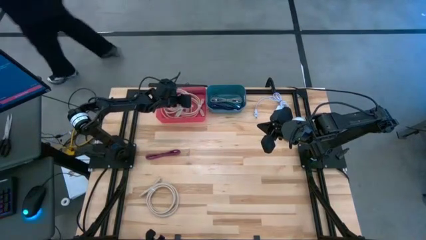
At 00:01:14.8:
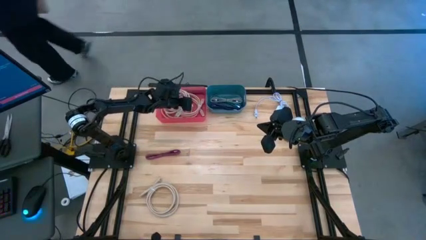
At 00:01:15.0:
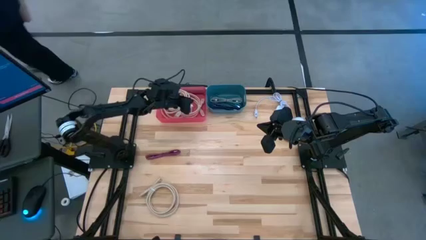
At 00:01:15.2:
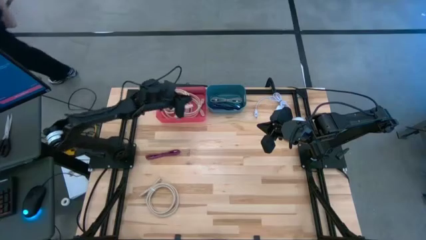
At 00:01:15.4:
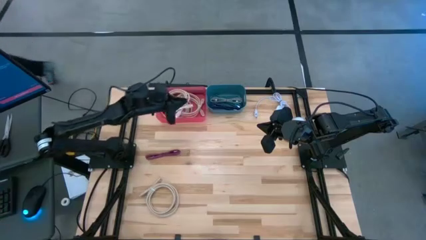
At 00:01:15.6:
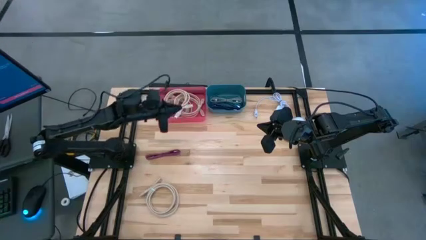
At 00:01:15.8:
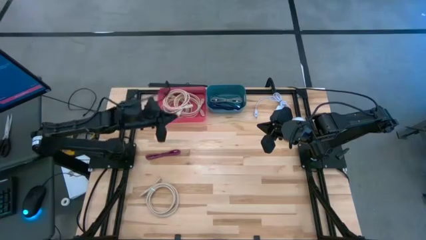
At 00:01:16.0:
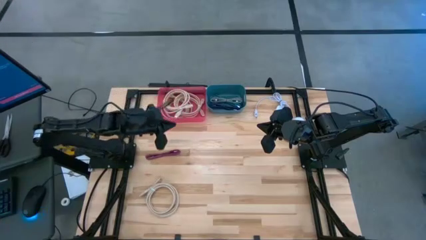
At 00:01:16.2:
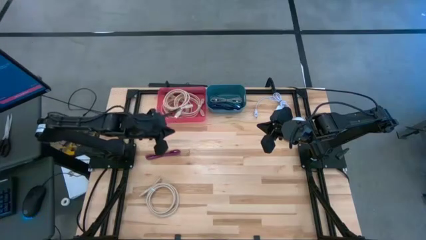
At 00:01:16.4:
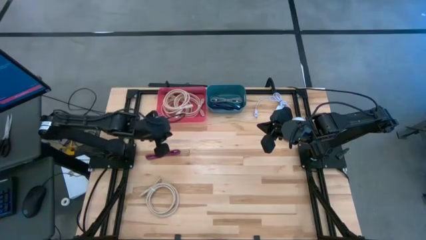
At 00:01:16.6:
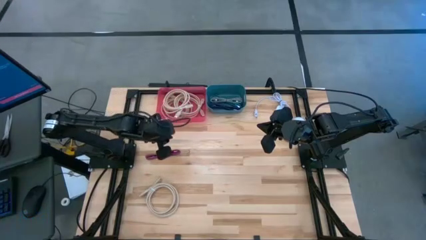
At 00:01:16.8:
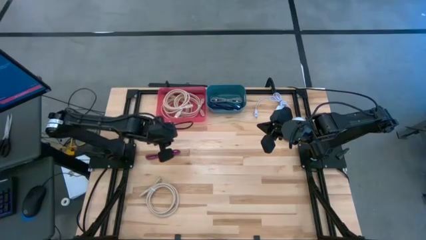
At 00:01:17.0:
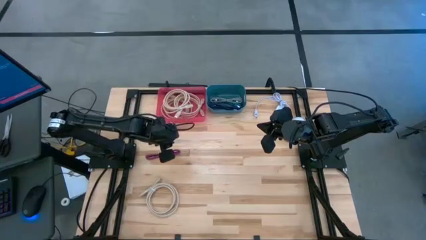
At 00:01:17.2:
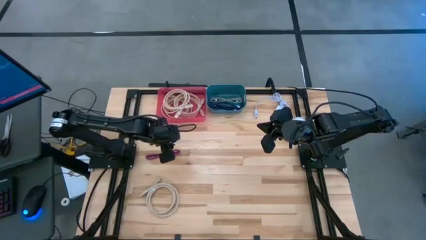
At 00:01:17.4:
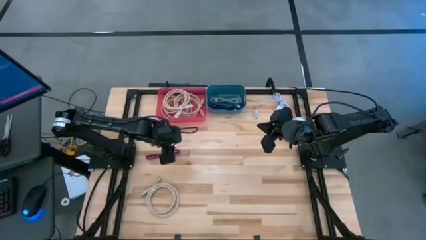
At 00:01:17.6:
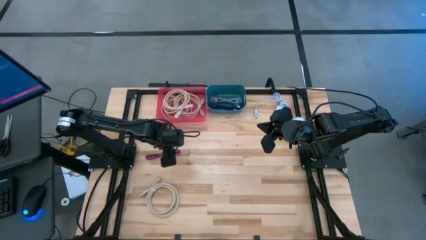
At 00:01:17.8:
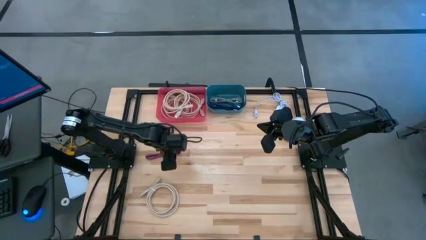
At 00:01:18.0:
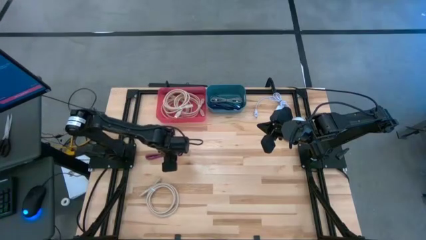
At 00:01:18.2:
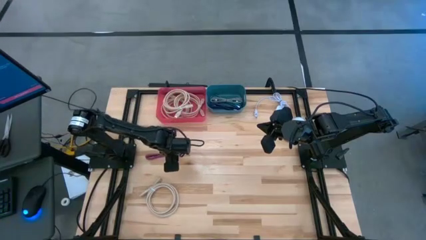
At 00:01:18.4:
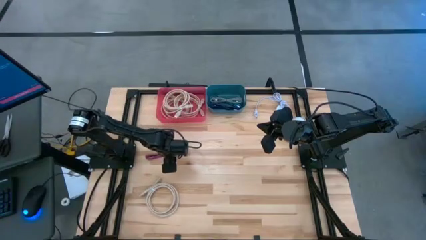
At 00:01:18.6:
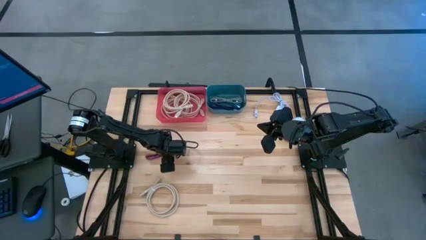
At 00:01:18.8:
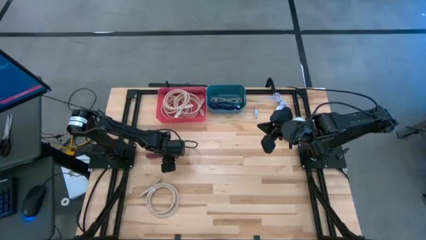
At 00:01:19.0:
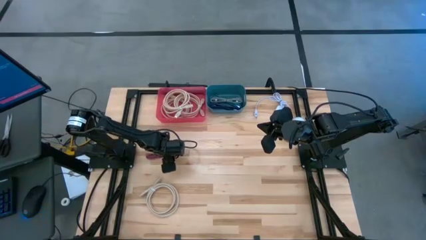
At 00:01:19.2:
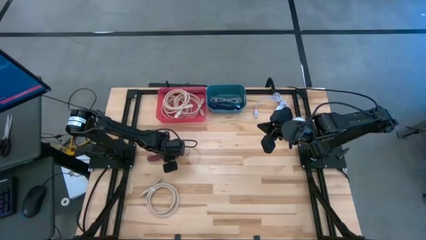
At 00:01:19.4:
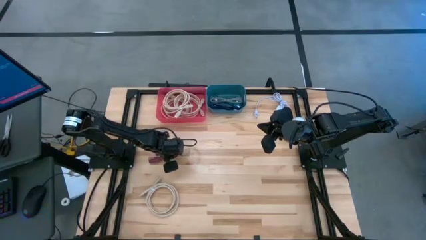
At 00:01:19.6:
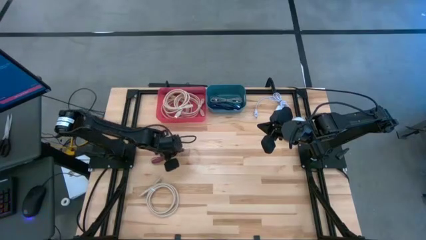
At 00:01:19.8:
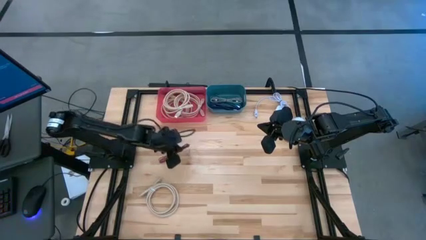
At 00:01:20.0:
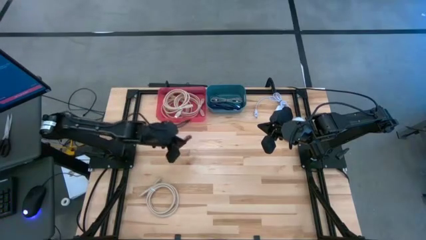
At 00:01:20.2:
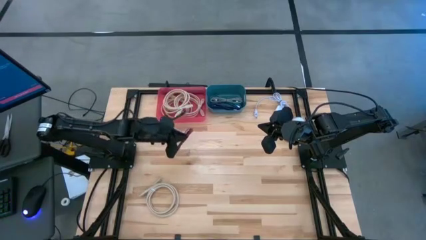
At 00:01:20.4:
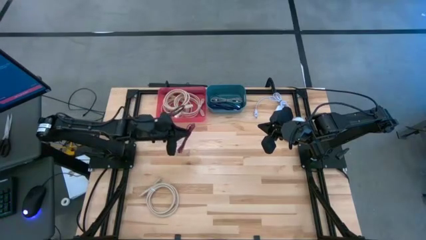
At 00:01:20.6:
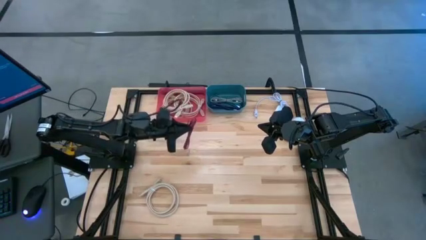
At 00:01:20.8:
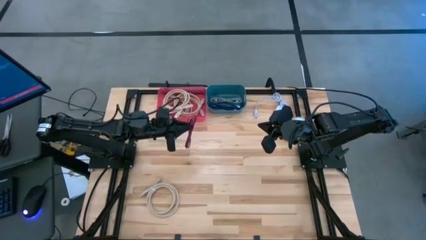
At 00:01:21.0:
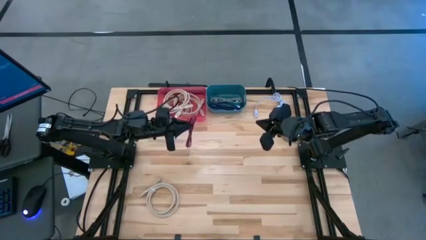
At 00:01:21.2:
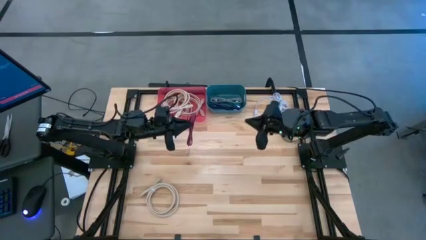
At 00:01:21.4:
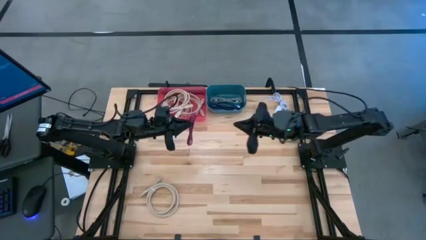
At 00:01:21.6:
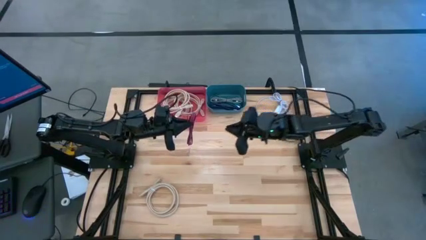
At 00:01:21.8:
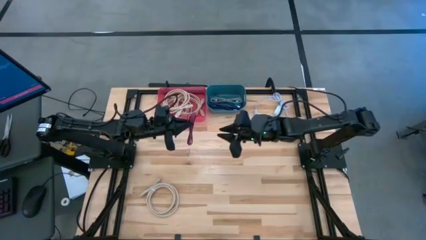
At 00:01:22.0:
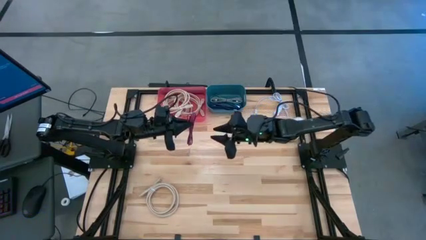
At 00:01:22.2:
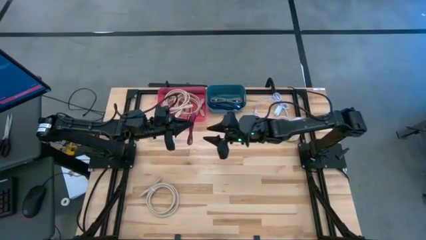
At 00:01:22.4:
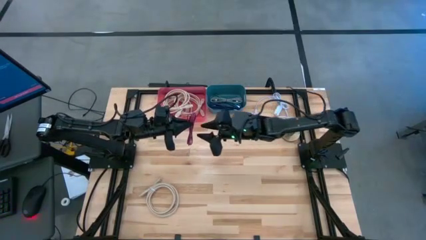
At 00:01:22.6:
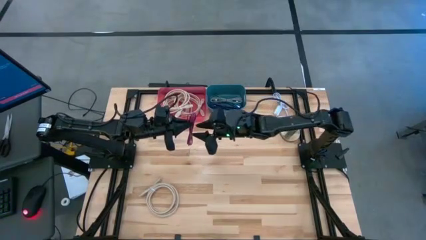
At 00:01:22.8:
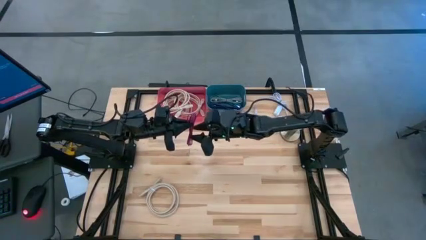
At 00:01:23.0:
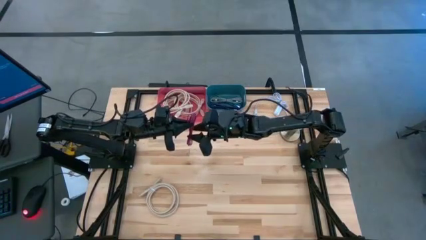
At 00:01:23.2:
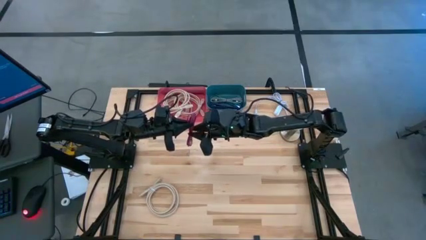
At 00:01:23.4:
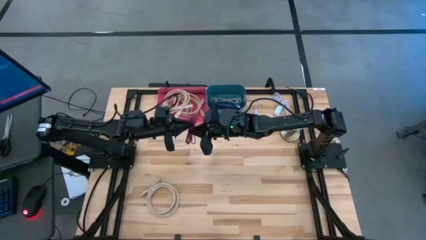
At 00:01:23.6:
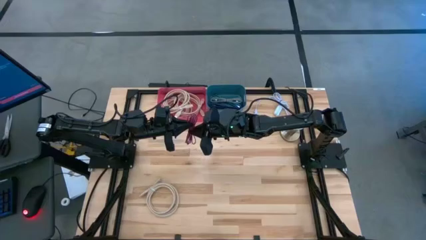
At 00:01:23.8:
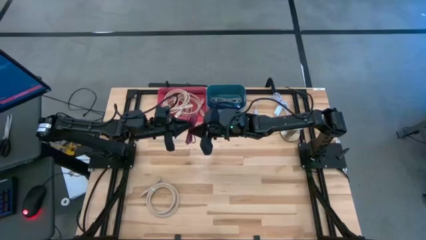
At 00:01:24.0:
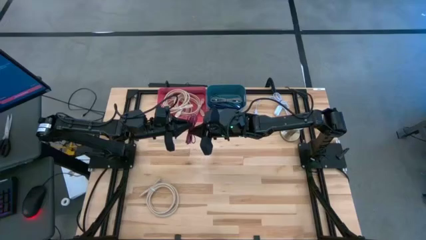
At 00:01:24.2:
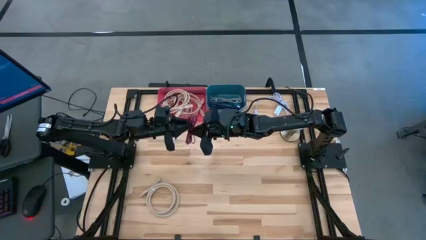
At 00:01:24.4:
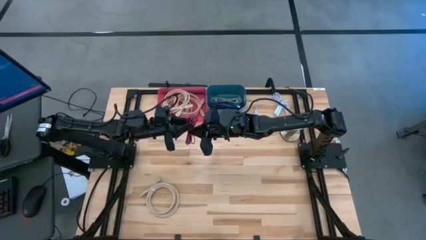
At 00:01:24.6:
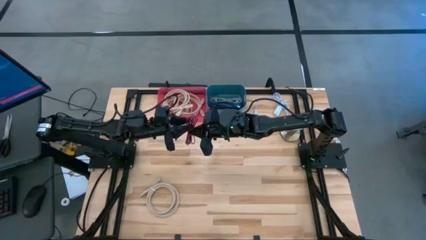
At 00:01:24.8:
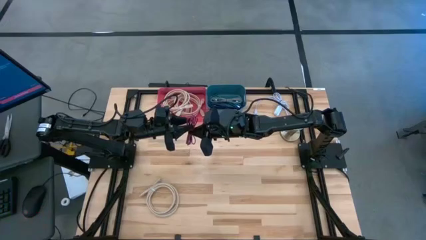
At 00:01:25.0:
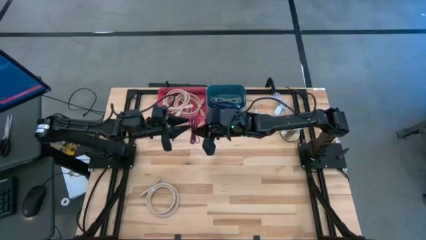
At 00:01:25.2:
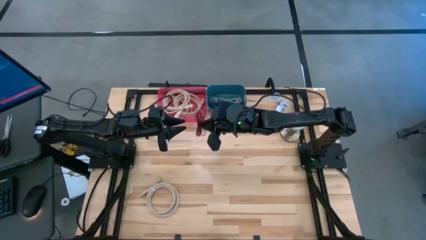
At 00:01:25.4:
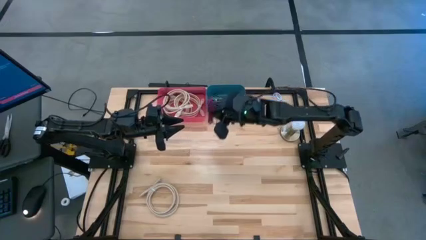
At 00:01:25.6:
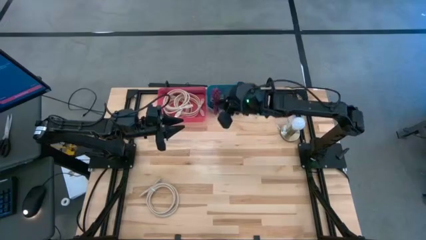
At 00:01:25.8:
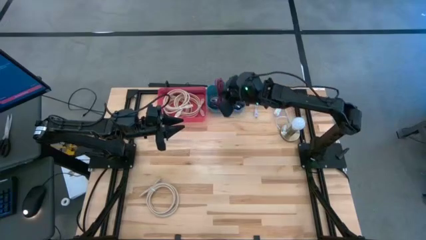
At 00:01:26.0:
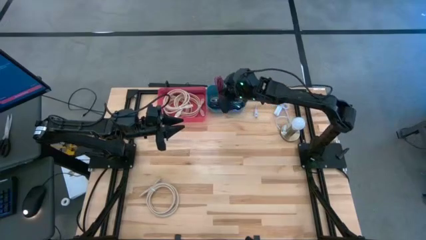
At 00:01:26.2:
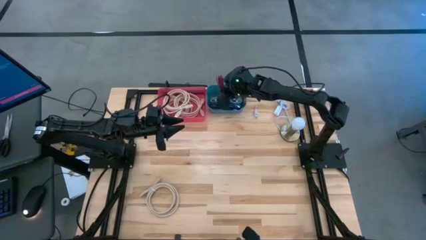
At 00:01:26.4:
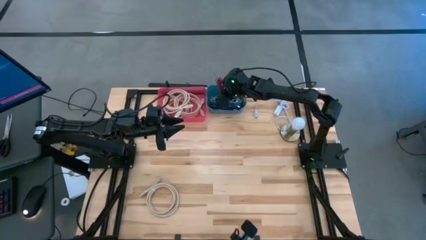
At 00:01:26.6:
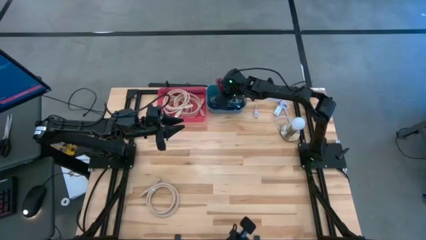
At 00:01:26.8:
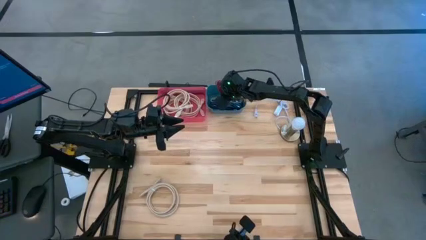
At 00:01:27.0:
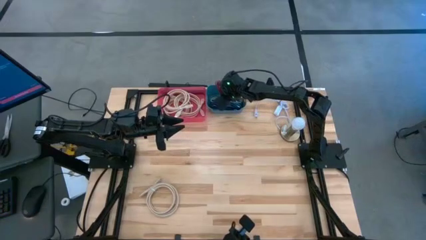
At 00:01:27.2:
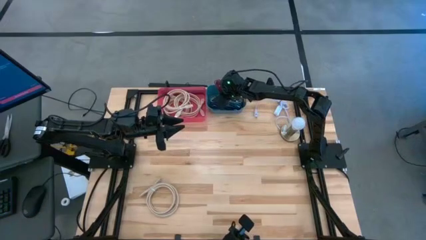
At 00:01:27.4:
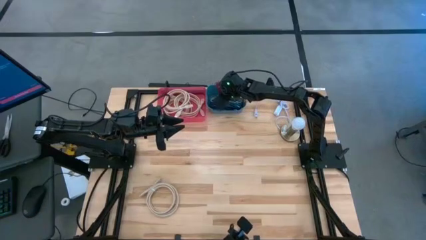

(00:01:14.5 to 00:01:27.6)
Task: Pick & Place USB Port
Put the black pink charger cable into the blue bin

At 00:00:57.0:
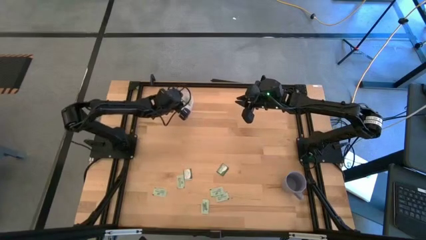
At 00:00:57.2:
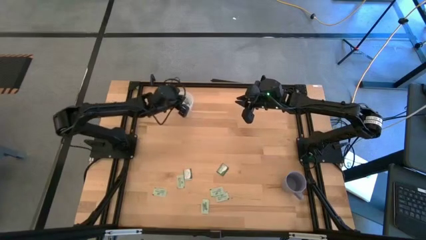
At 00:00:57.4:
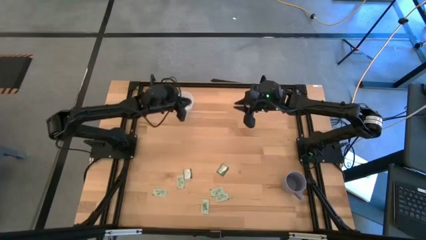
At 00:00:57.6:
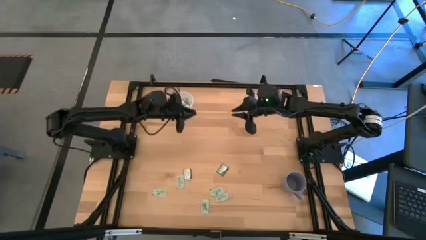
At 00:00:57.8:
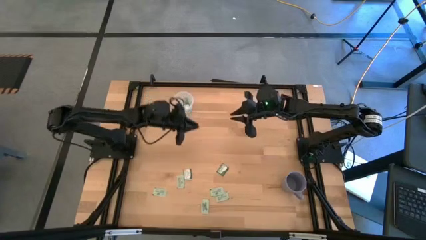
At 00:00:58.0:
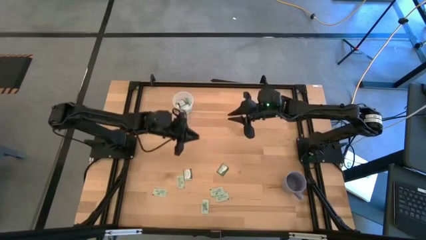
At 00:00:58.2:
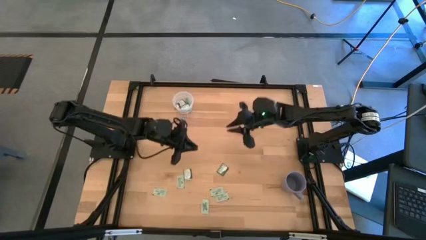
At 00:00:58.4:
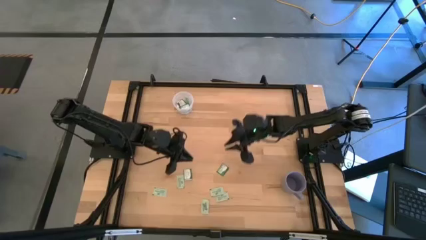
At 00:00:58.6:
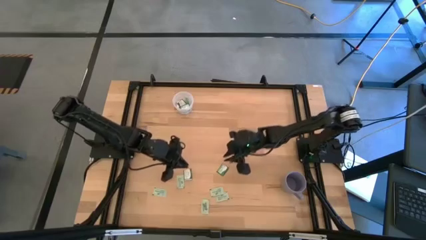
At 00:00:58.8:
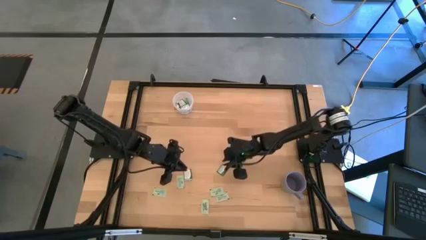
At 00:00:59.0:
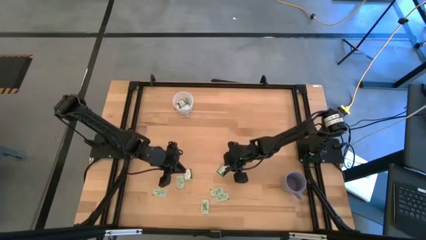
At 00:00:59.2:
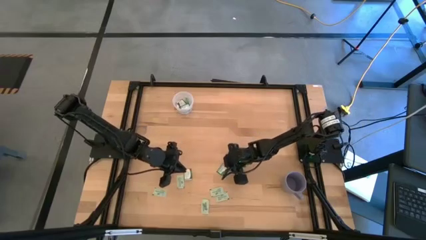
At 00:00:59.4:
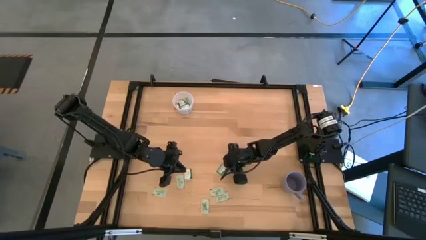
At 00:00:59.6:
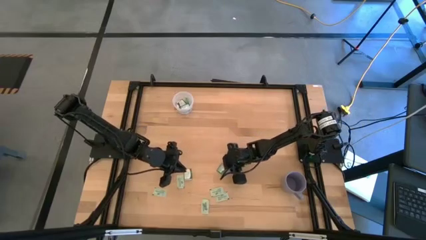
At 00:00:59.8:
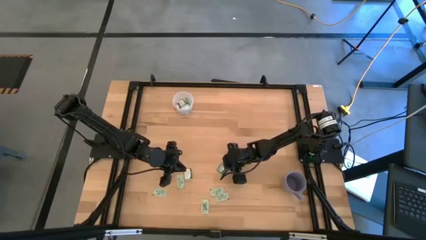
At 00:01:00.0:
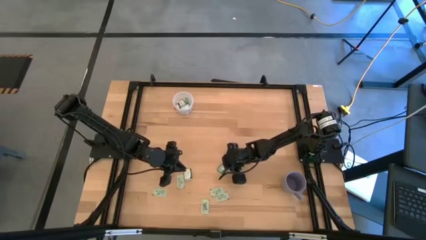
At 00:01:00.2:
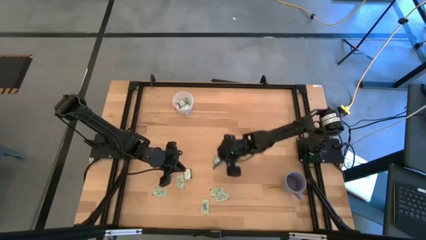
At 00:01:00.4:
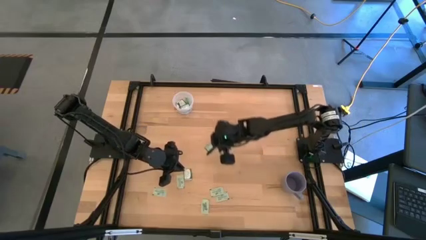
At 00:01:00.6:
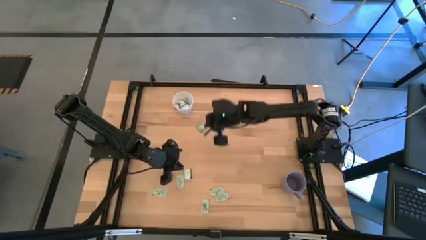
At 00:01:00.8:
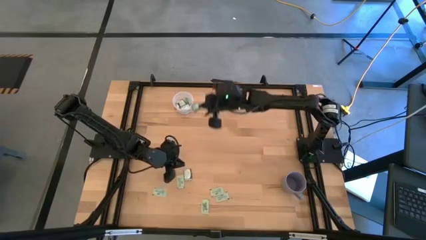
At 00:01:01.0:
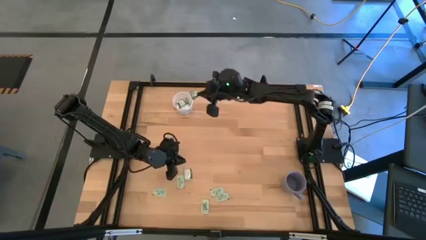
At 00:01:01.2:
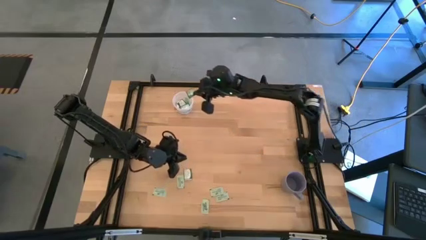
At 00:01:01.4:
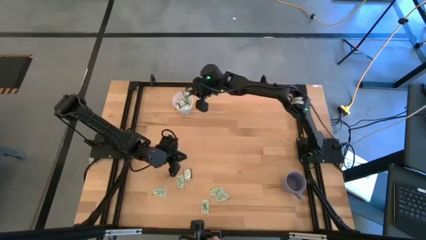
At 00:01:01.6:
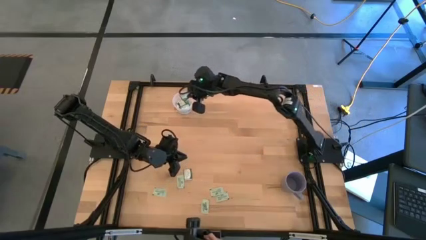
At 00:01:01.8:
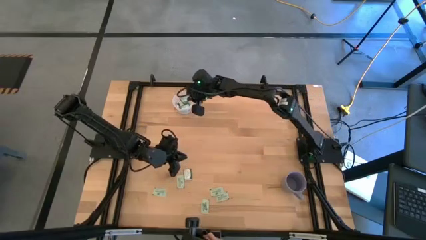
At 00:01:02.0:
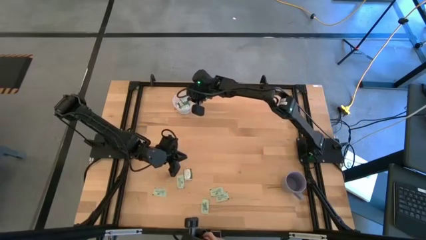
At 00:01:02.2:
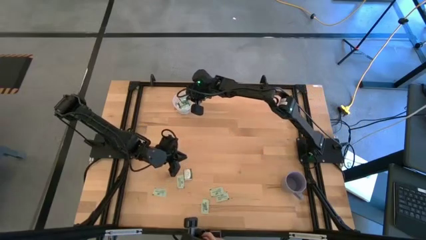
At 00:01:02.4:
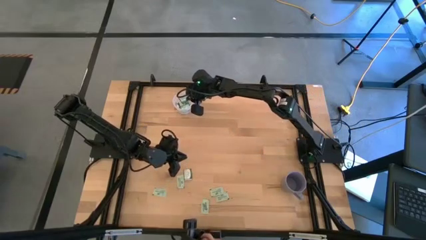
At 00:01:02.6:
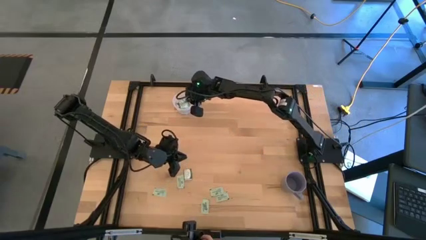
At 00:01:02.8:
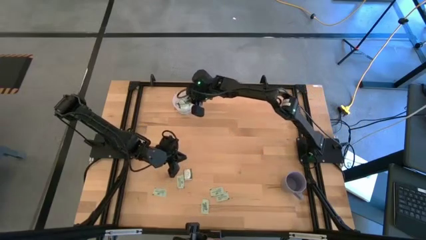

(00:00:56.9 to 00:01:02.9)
Task: Pick and place items into bin
Put the truvia packet into the transparent bin
